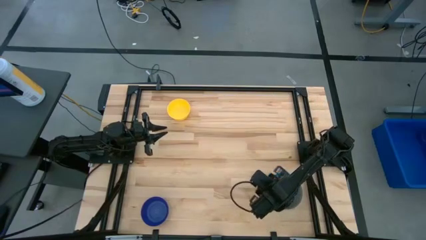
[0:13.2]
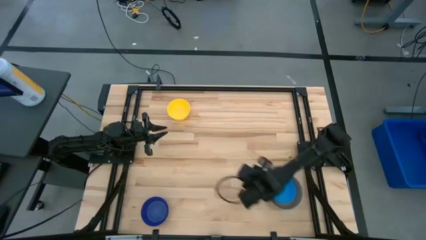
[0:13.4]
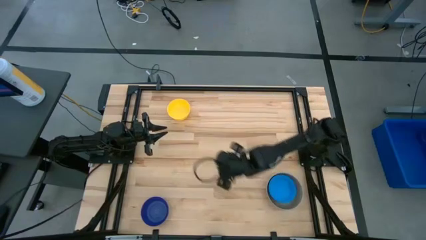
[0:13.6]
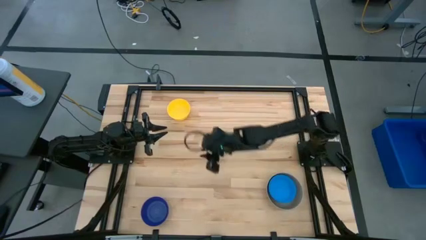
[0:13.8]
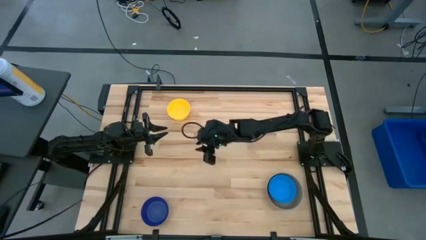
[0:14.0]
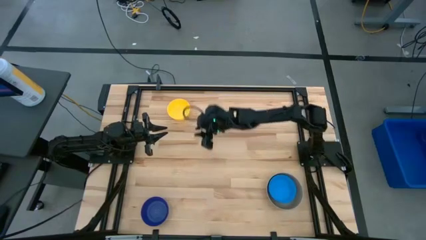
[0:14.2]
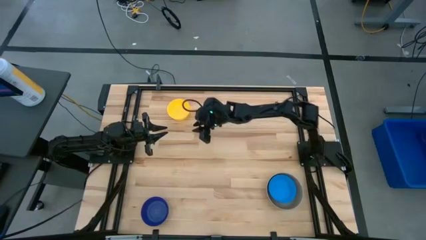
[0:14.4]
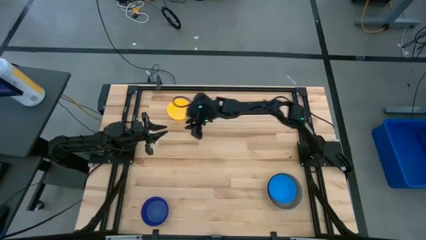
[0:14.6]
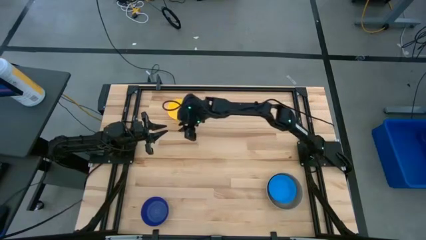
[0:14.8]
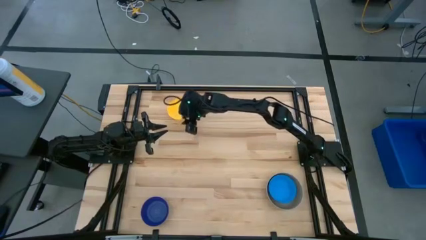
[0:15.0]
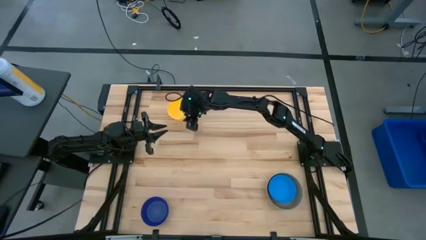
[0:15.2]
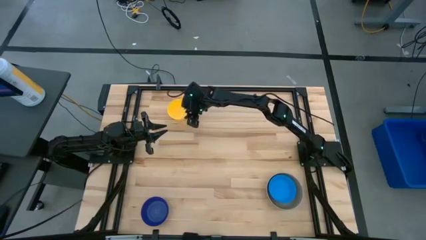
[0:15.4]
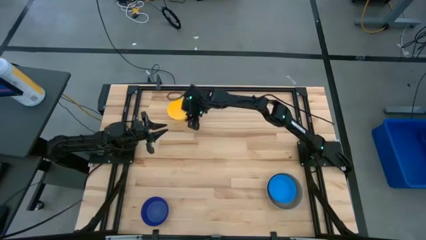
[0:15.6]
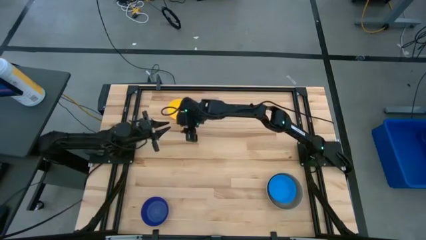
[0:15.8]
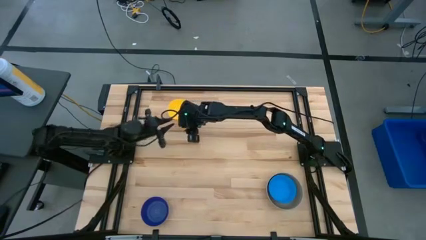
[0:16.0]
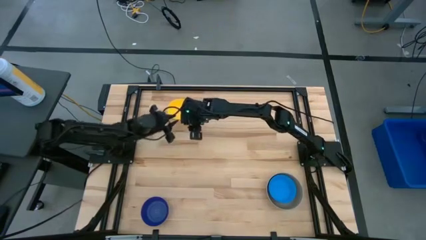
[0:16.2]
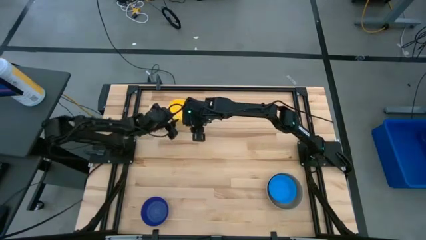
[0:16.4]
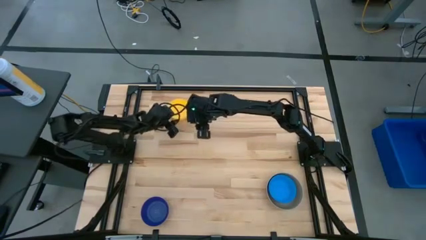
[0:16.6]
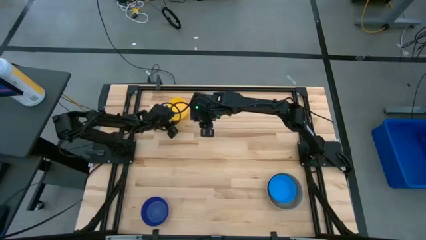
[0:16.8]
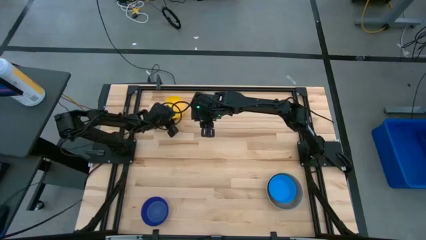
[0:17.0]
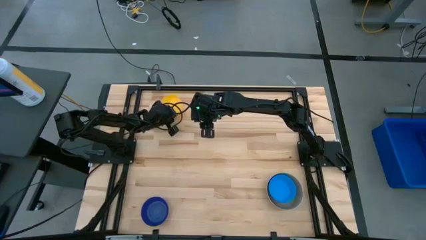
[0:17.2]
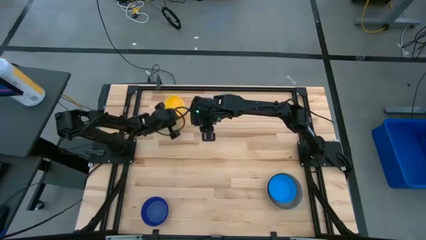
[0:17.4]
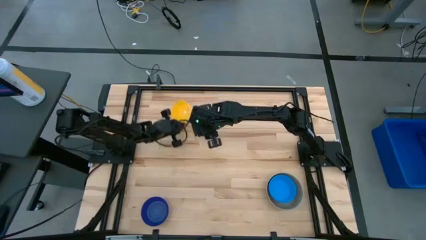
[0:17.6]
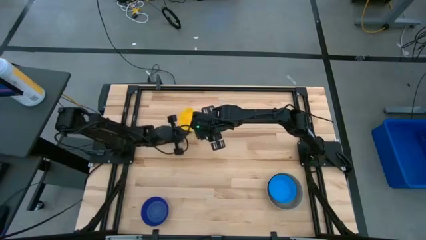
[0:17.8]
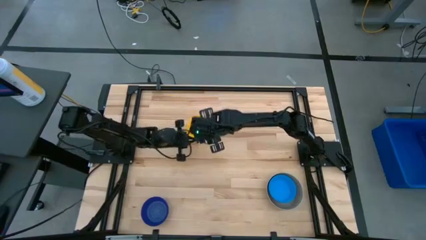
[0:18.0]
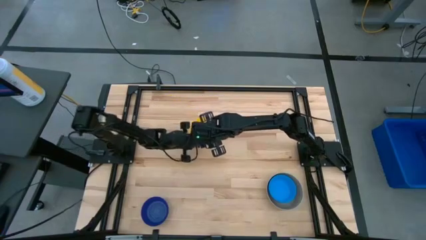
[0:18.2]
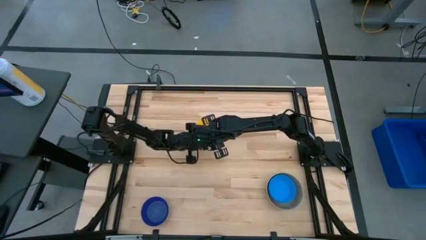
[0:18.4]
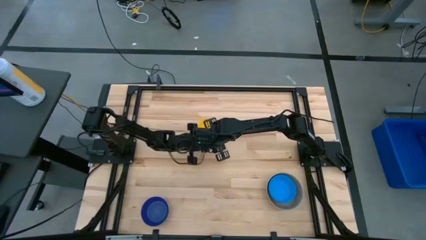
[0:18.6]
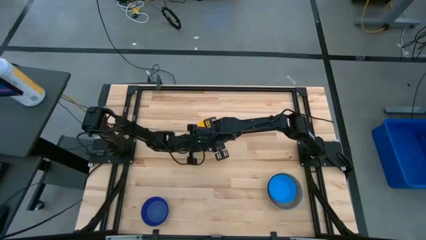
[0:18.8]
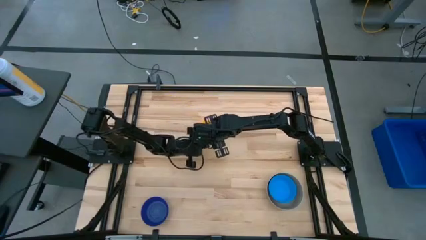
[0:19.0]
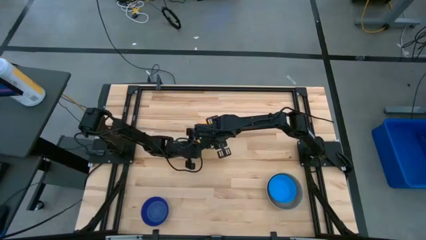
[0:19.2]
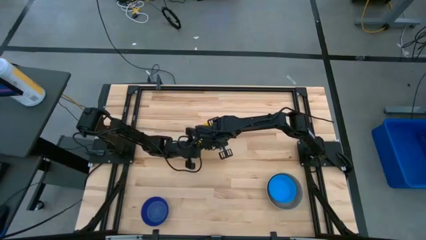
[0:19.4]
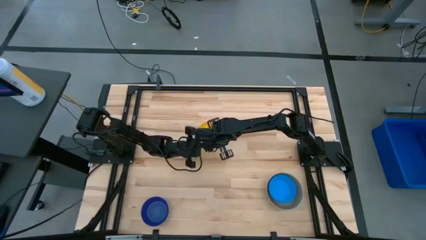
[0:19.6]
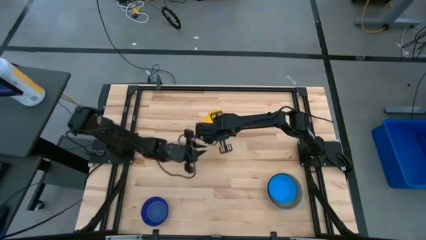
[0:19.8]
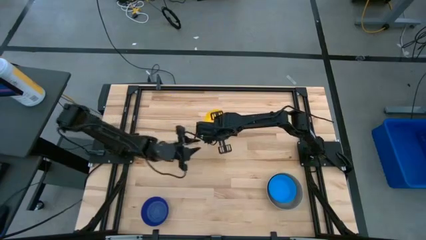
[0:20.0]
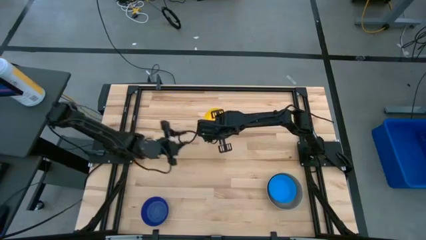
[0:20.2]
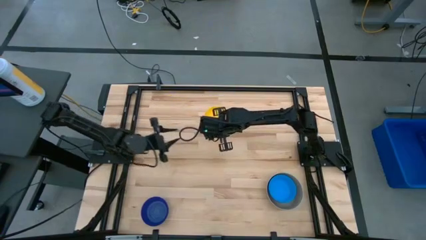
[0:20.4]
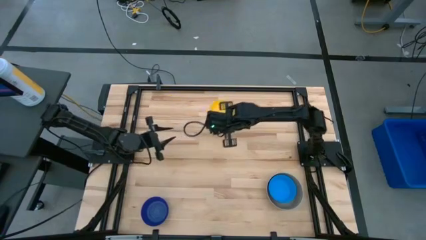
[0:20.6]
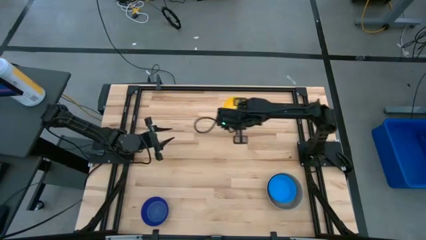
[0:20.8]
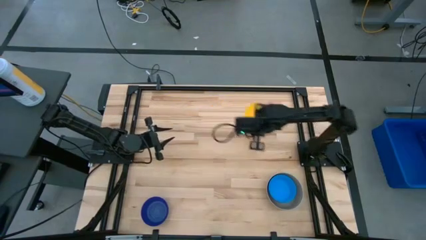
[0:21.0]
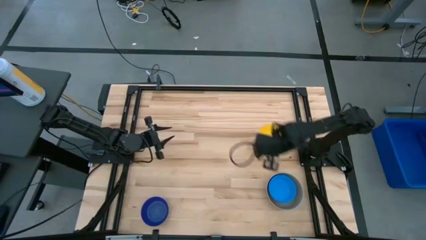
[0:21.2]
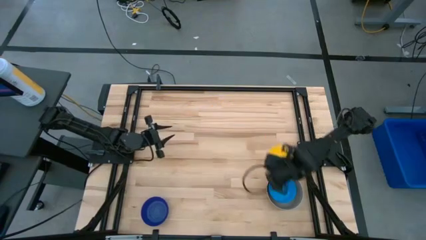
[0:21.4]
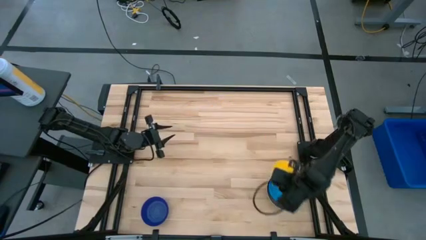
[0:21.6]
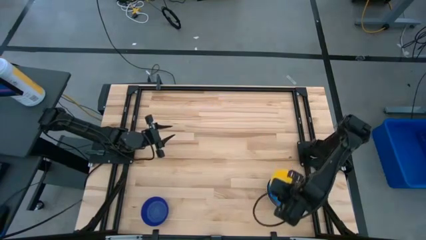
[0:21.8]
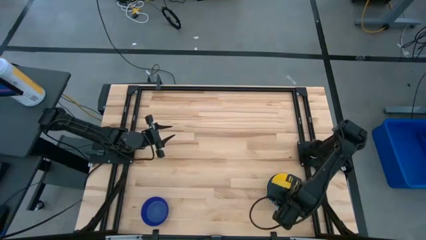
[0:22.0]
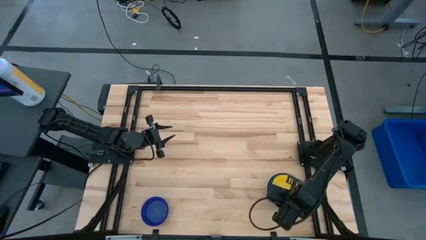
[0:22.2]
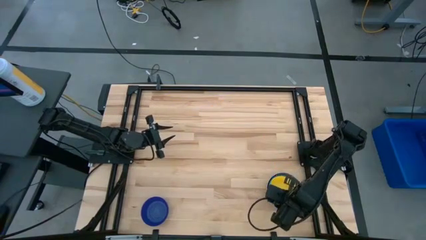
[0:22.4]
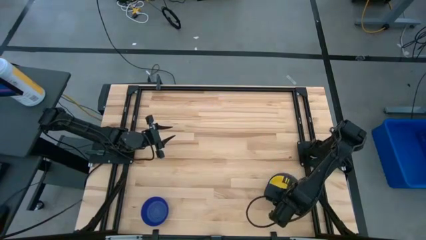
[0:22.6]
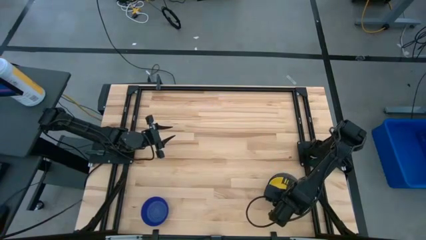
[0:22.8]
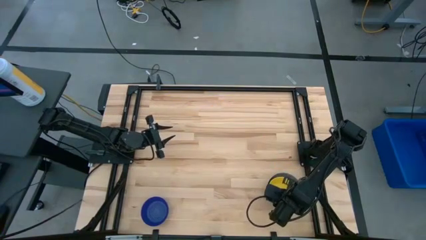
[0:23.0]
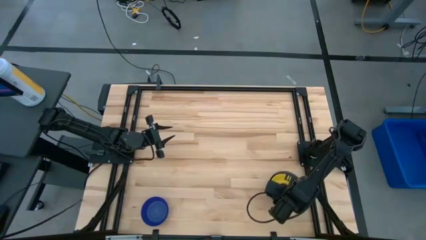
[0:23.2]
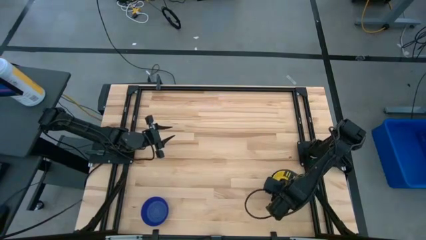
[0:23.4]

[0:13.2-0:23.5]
Stack the yellow bowl on top of the blue bowl

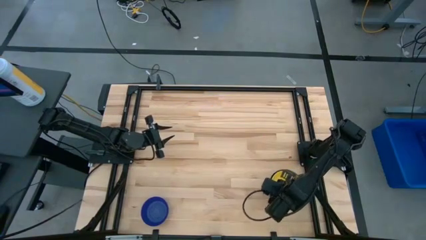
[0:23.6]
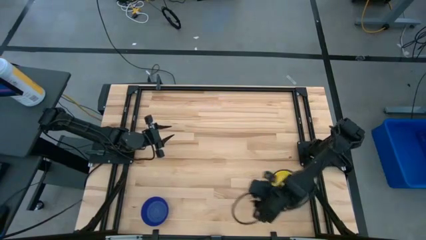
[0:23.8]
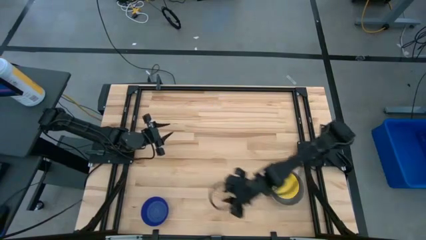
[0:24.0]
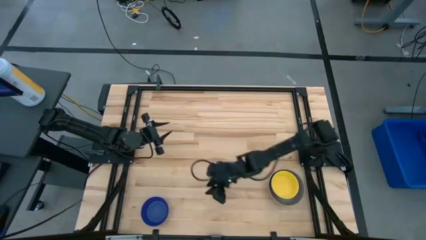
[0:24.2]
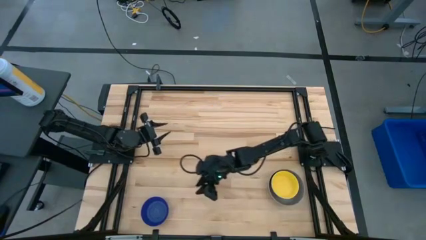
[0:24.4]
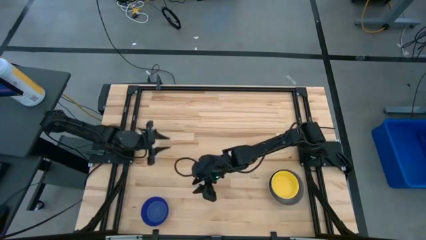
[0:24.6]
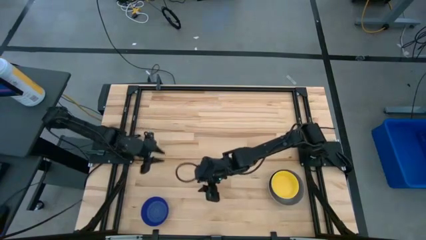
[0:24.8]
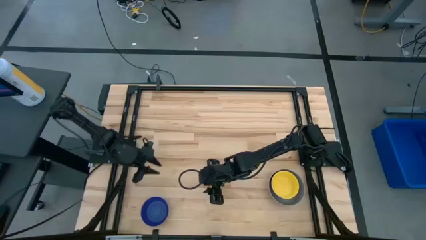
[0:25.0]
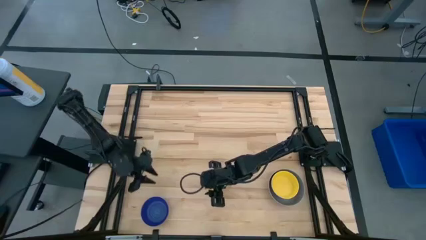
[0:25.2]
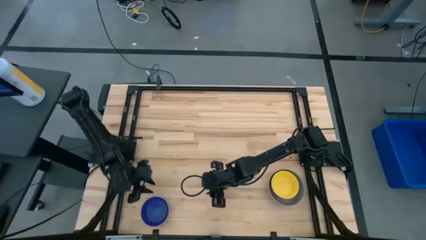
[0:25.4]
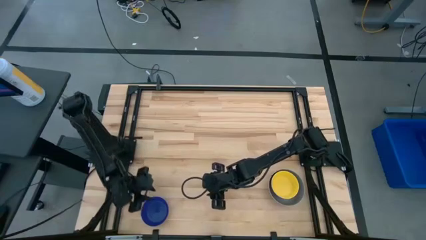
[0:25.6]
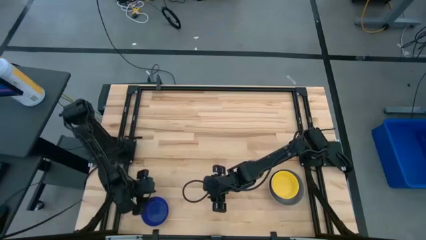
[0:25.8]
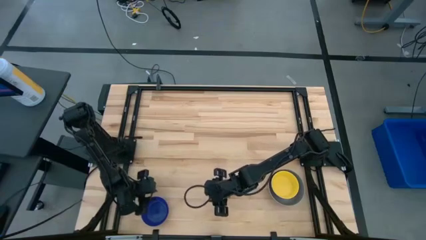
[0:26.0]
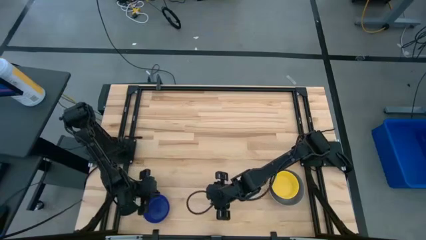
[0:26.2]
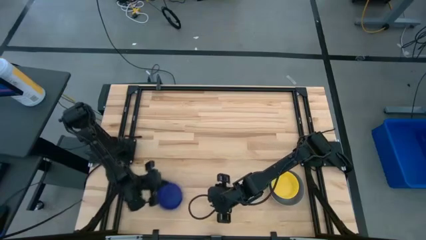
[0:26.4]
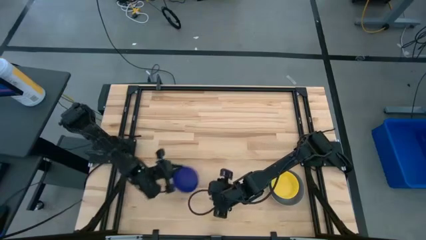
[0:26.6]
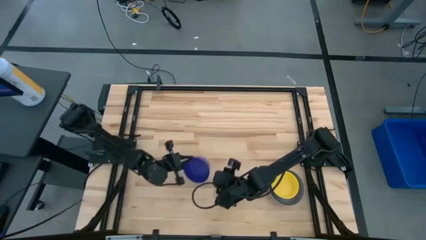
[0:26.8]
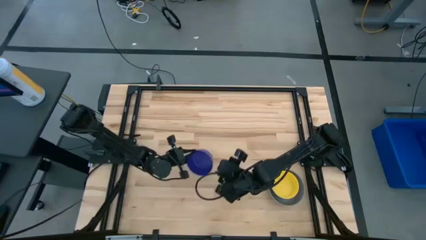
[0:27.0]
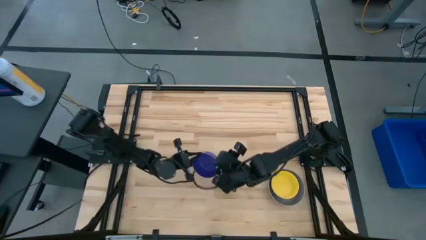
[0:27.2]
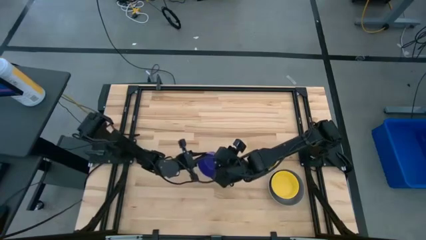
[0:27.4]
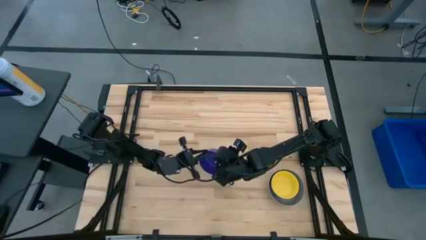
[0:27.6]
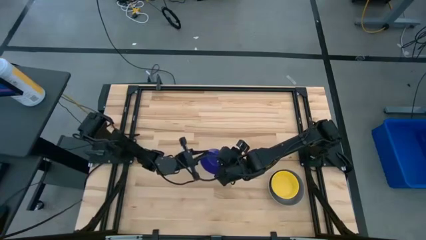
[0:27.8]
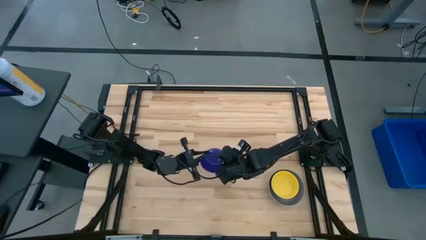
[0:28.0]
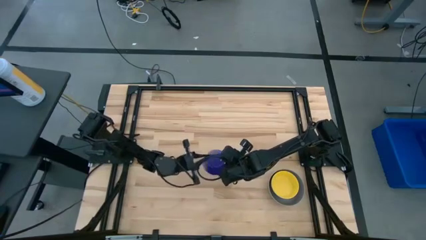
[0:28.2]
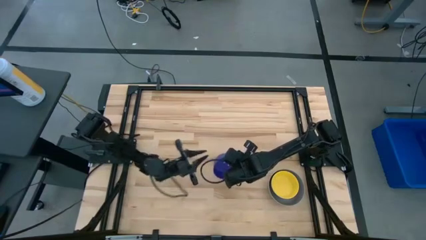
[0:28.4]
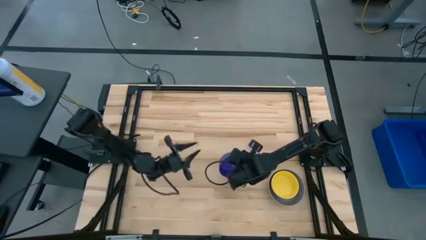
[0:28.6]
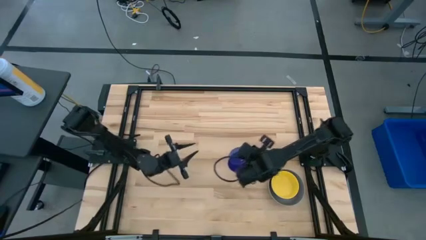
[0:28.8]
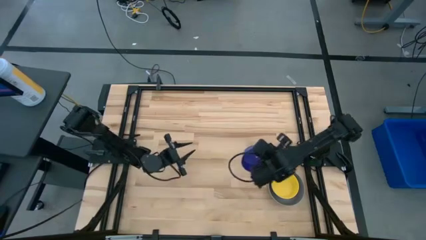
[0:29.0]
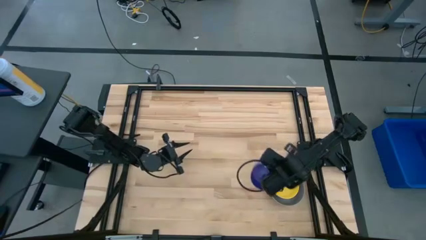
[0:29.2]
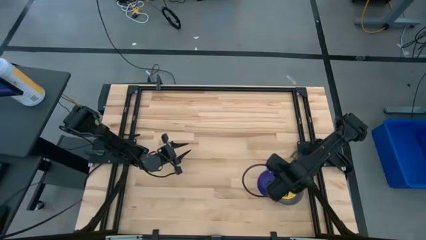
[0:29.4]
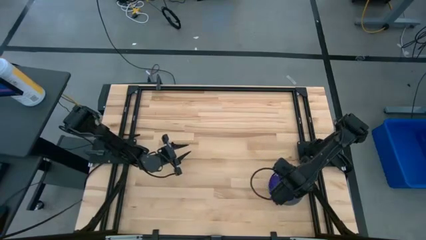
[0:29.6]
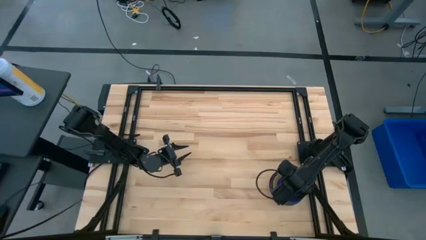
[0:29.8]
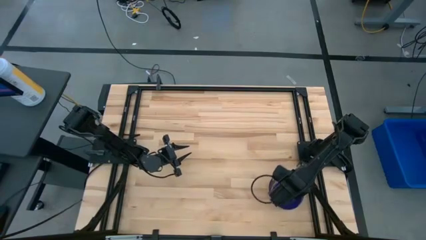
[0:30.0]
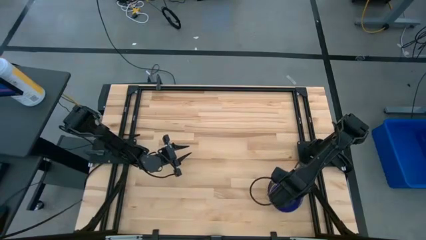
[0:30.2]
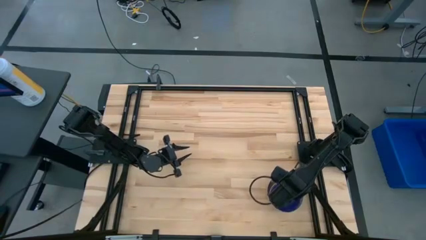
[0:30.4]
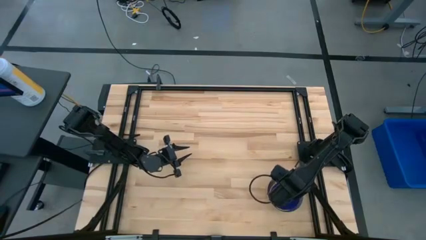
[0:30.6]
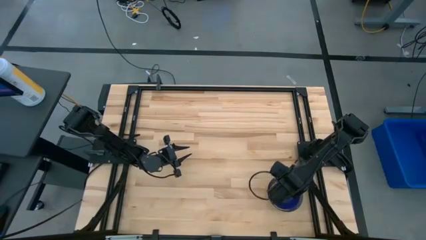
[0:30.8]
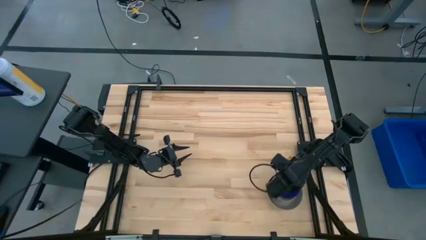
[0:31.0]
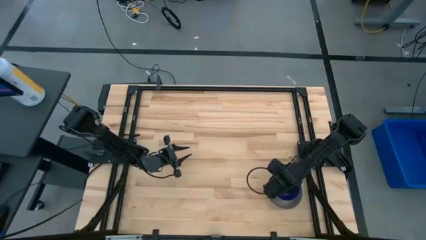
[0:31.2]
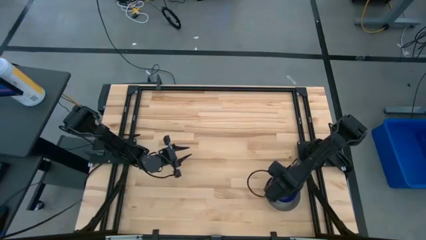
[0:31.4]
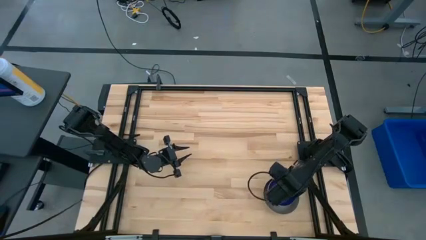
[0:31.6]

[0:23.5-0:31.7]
Stack the dark blue bowl on top of the yellow bowl
